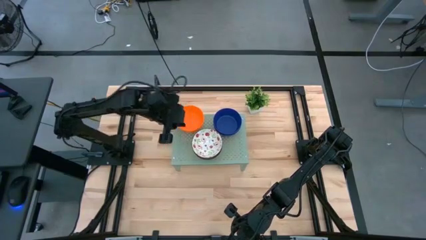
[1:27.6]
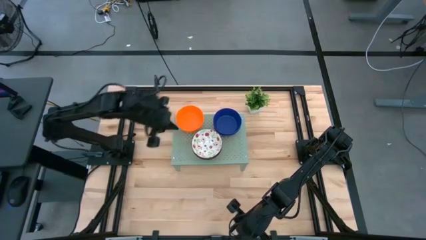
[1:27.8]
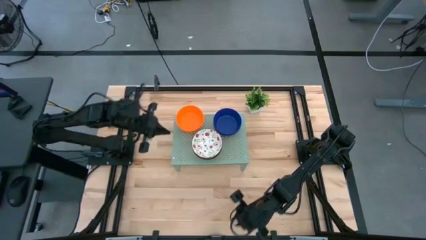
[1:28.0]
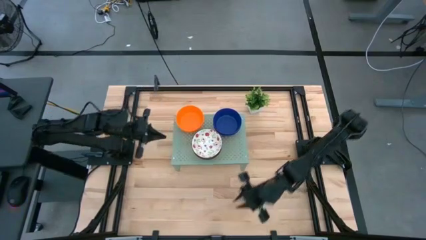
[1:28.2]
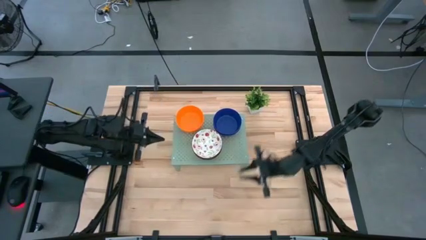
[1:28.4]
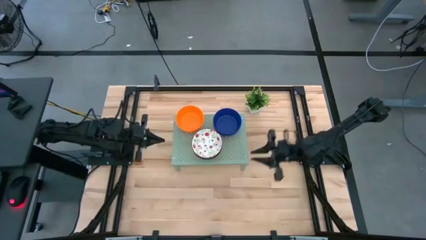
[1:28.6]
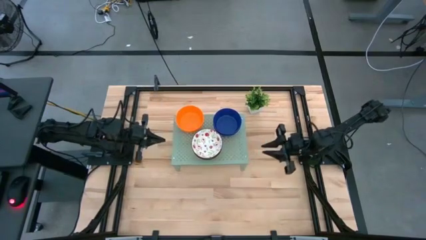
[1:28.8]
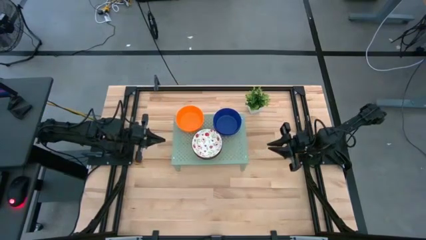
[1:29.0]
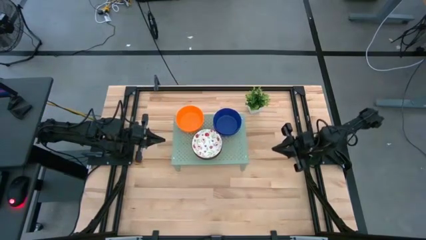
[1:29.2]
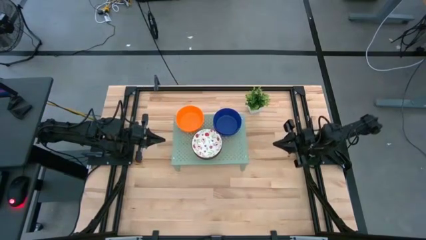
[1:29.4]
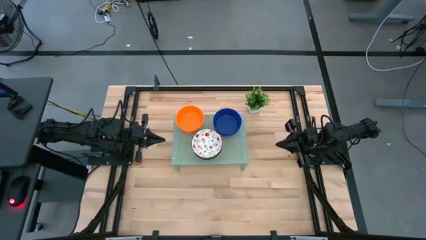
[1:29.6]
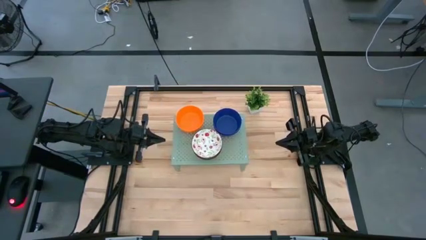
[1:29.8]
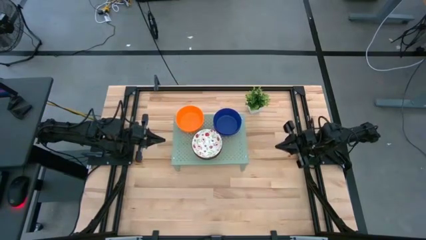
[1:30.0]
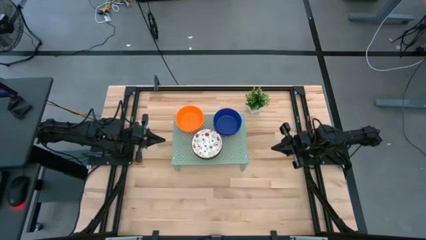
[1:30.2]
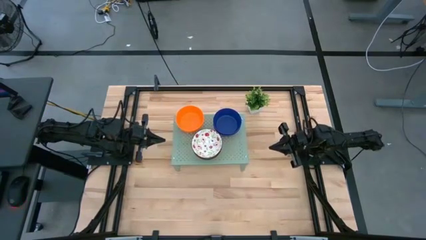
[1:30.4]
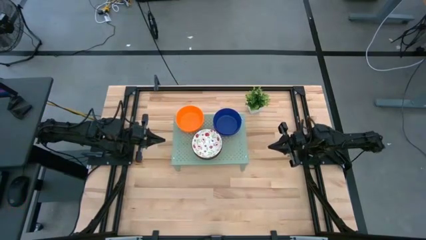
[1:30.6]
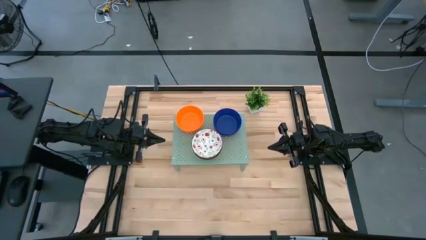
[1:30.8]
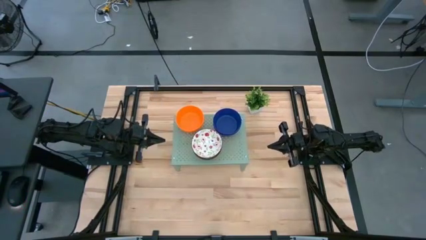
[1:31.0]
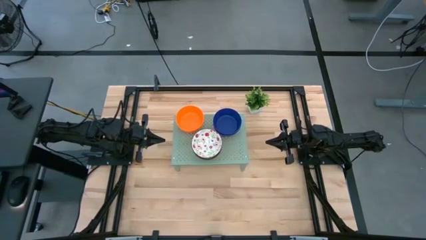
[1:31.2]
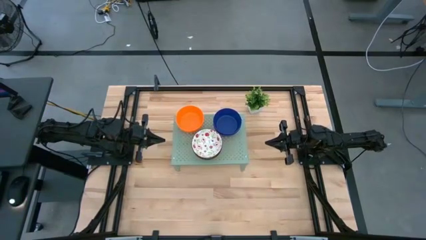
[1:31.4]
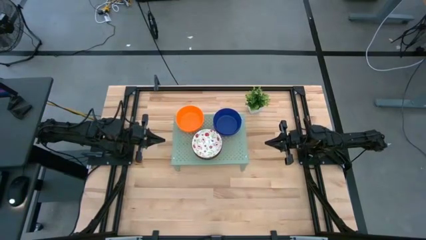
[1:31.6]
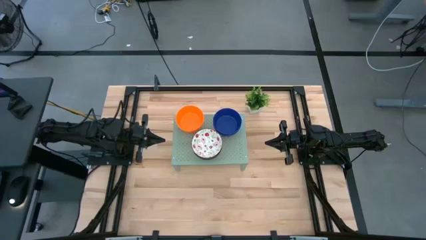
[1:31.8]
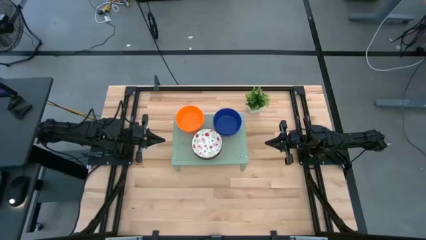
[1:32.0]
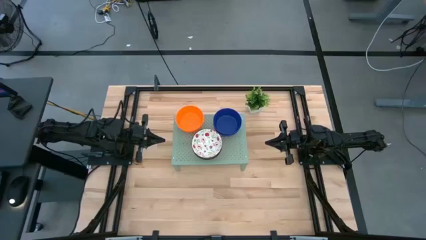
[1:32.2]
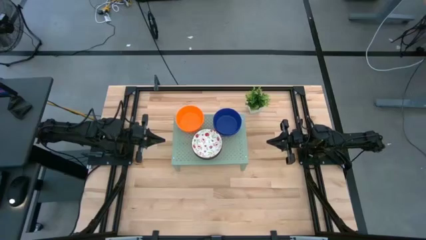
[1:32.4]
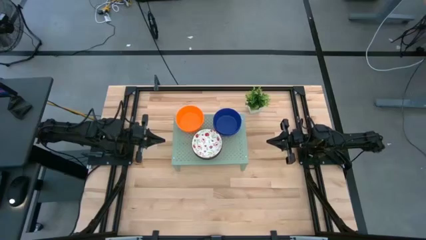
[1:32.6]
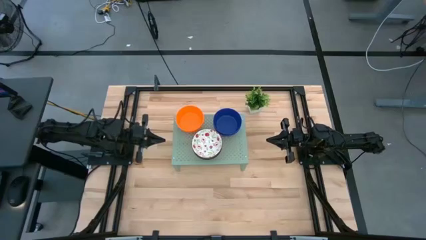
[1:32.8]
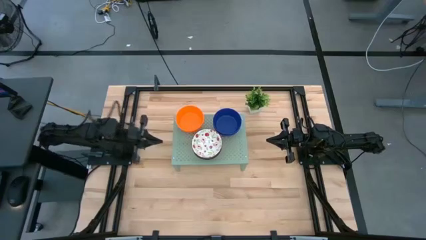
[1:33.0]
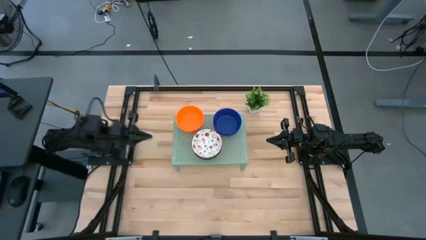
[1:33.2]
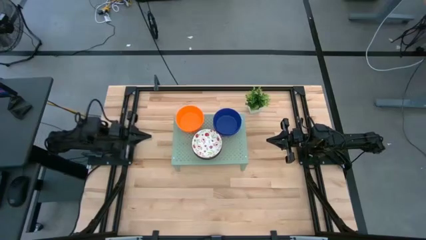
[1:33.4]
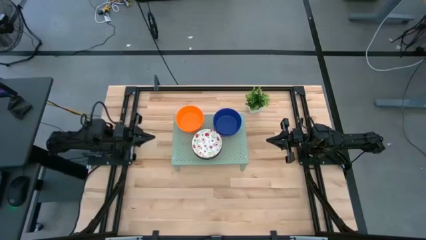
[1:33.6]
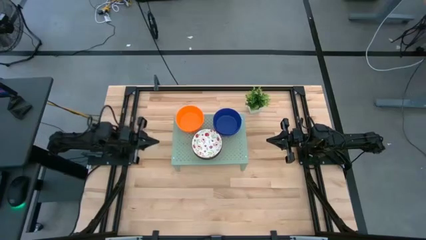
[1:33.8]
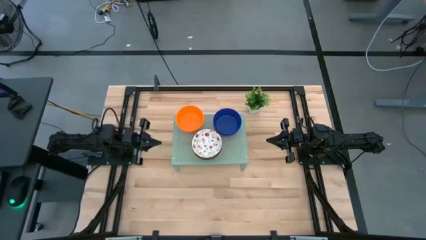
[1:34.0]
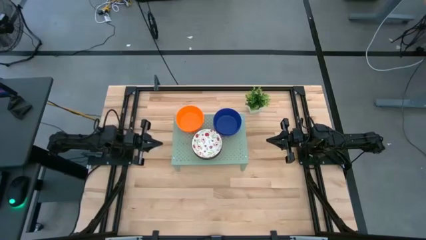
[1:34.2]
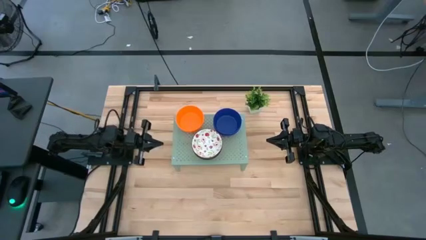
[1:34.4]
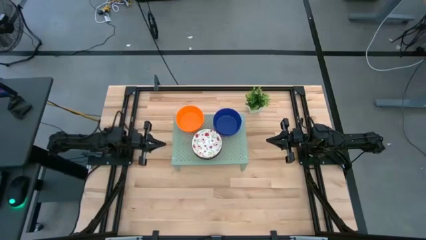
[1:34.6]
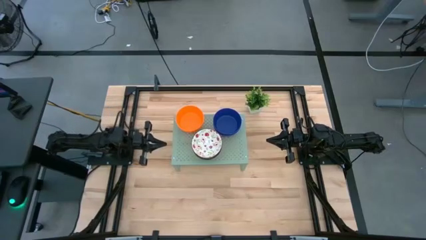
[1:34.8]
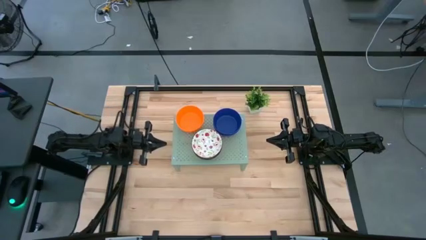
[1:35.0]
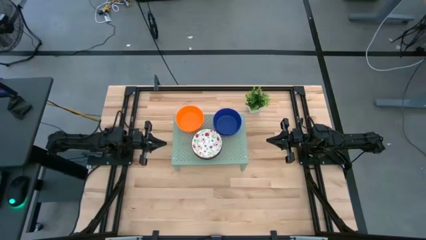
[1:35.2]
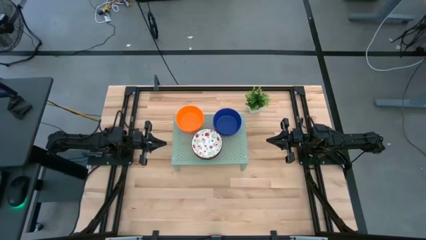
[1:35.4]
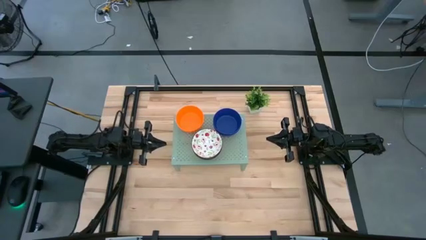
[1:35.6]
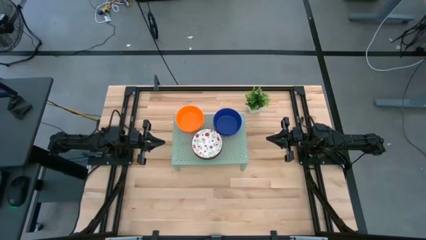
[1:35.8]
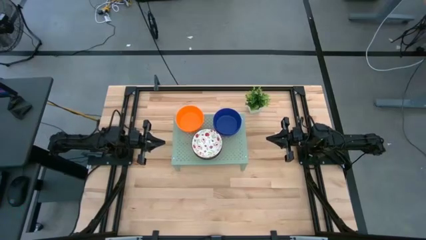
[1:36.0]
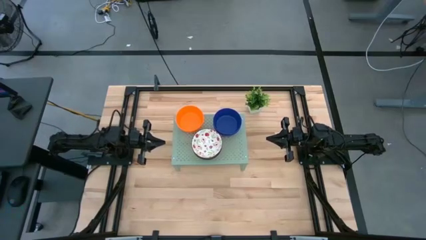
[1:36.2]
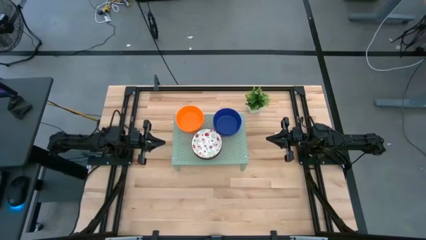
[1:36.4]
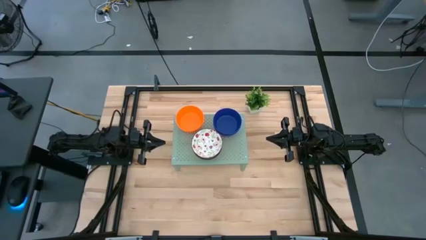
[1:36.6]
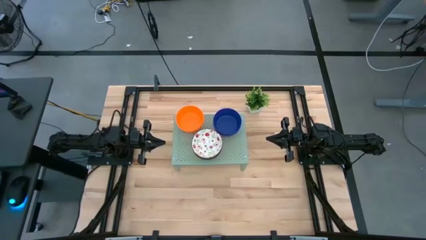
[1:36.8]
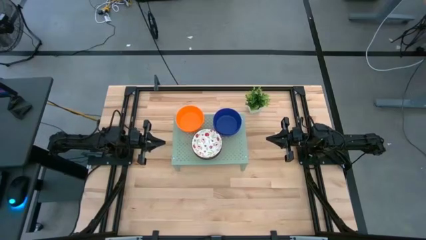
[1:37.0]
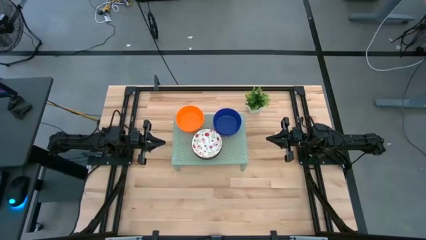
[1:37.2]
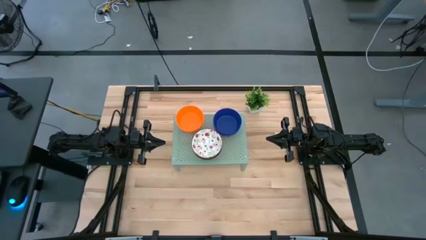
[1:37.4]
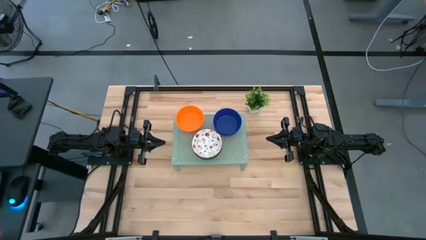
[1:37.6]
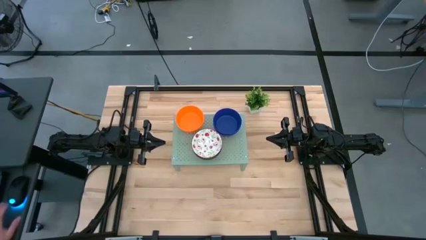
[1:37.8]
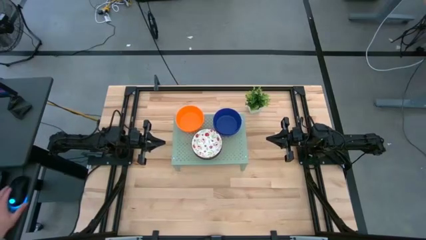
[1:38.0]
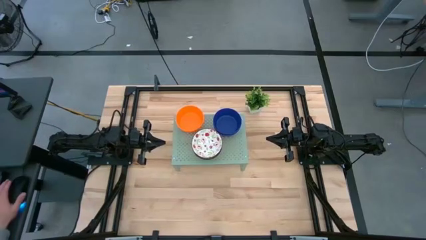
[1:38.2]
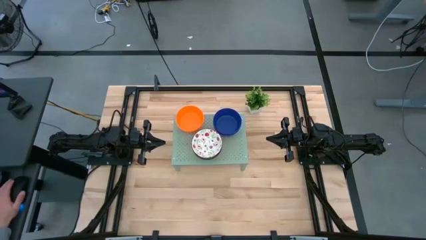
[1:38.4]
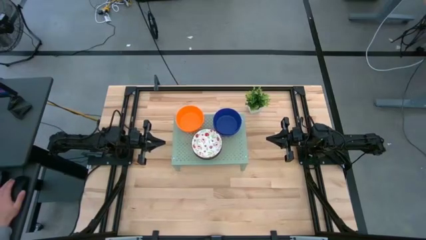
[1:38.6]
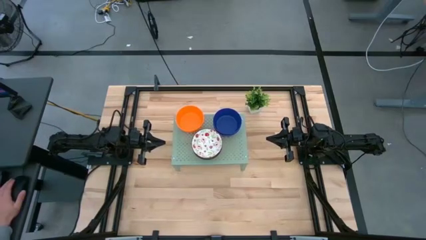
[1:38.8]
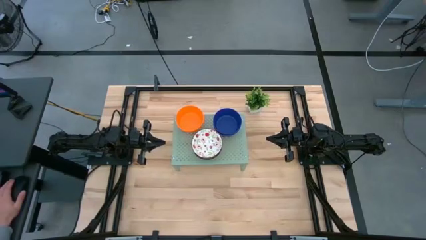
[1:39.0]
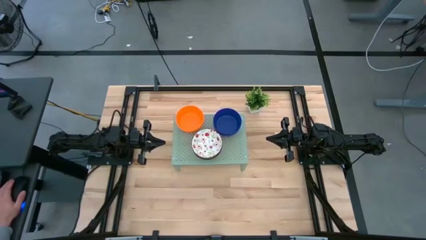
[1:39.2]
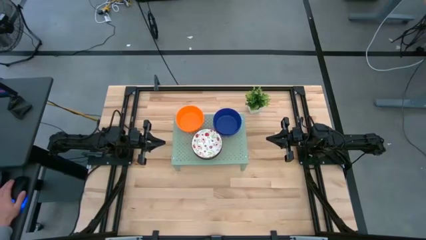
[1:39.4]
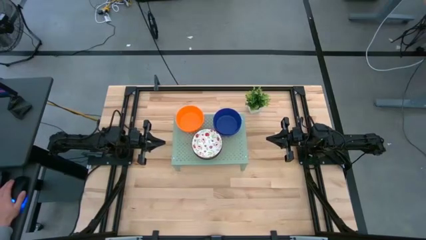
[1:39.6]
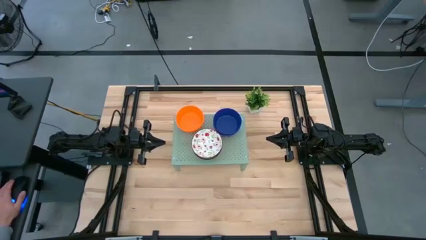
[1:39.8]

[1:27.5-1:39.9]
Task: Pick & Place Mini bowls
Return to Home Position

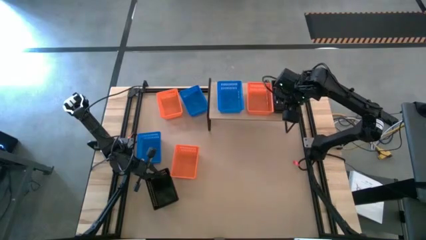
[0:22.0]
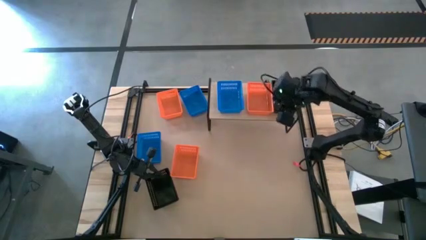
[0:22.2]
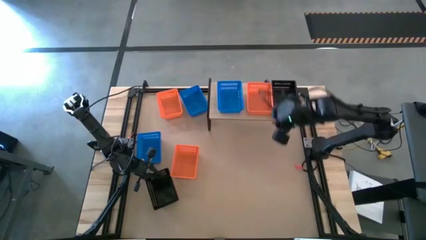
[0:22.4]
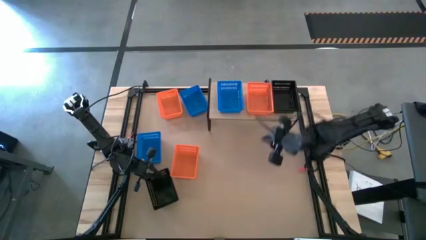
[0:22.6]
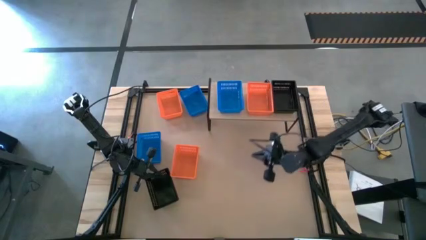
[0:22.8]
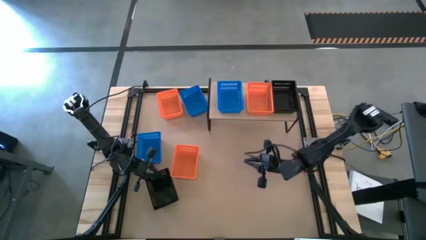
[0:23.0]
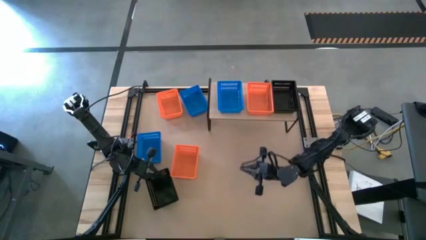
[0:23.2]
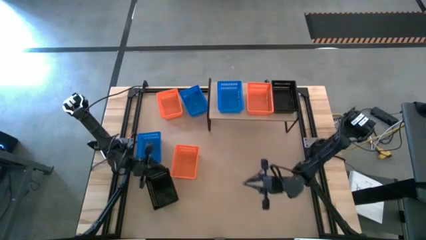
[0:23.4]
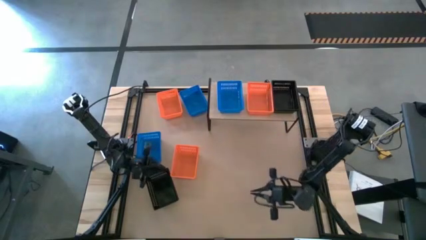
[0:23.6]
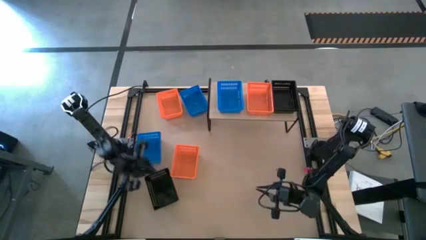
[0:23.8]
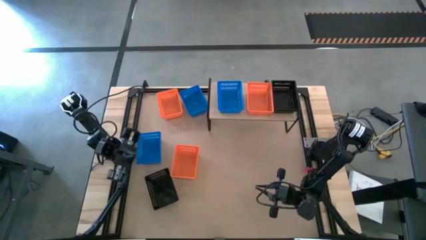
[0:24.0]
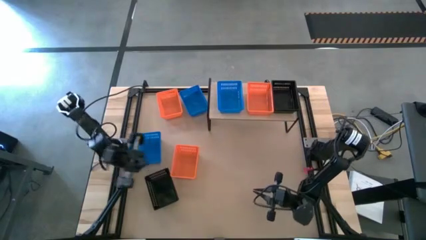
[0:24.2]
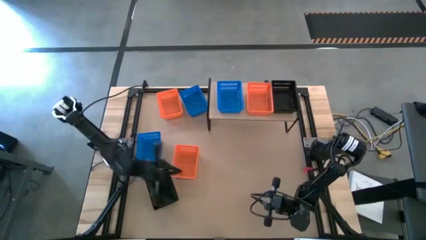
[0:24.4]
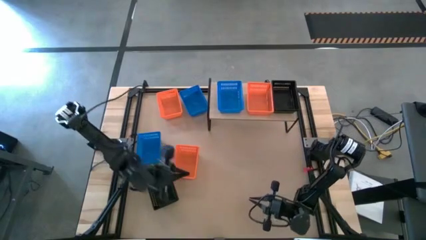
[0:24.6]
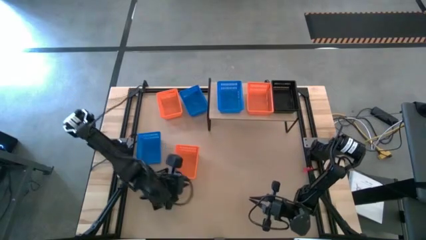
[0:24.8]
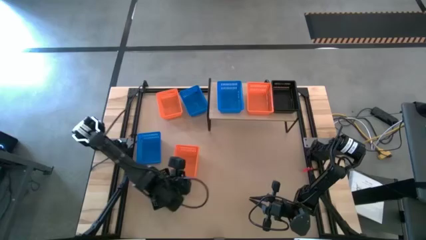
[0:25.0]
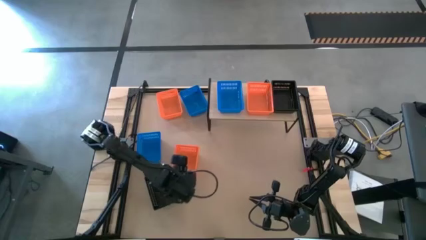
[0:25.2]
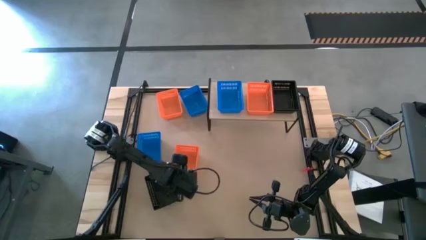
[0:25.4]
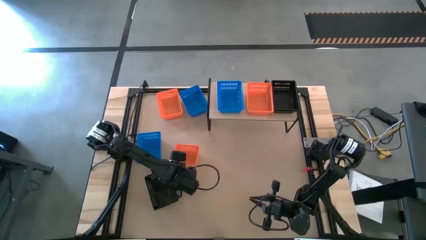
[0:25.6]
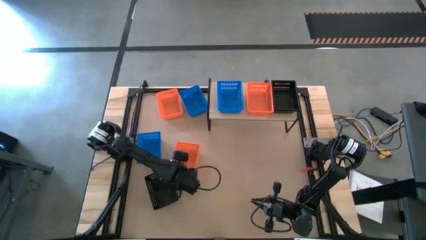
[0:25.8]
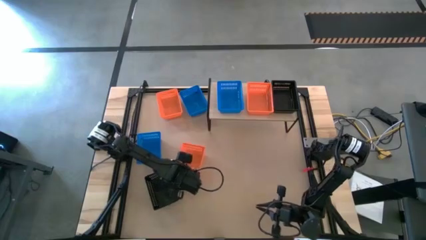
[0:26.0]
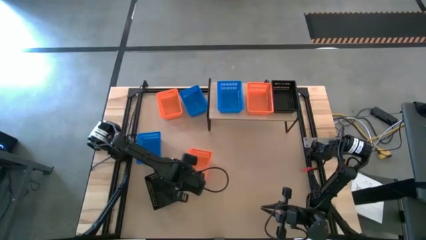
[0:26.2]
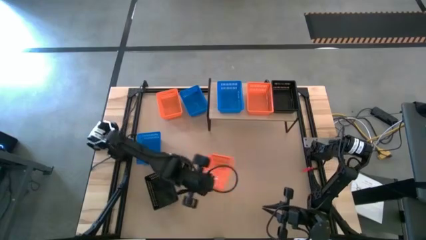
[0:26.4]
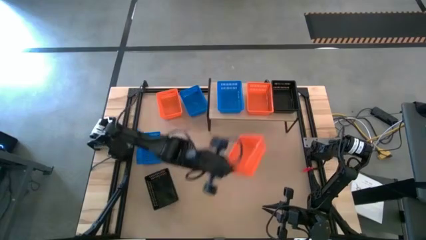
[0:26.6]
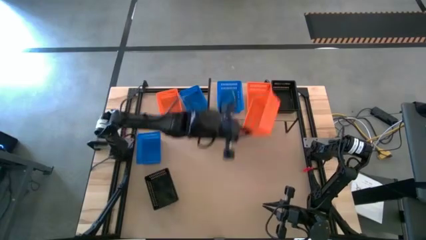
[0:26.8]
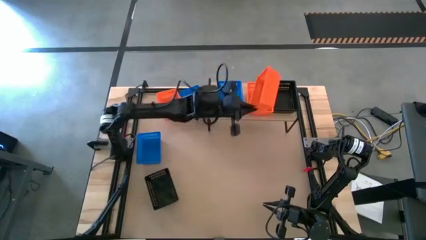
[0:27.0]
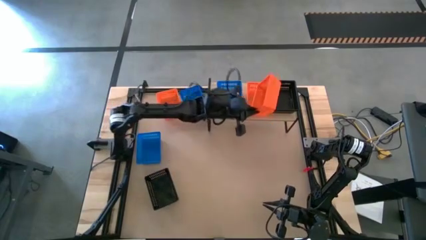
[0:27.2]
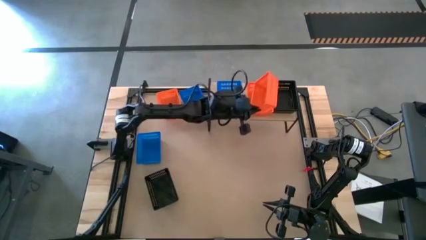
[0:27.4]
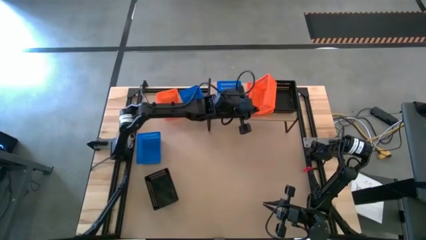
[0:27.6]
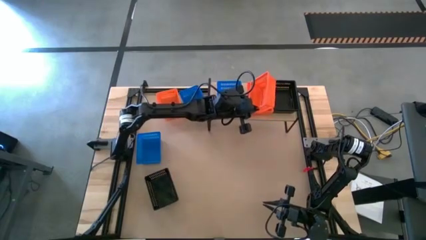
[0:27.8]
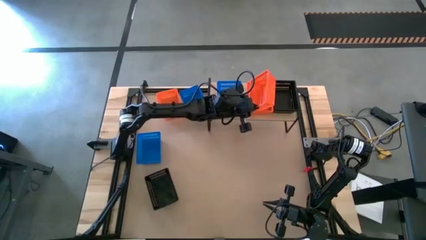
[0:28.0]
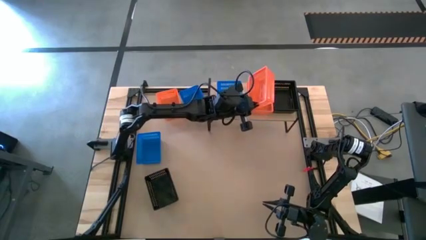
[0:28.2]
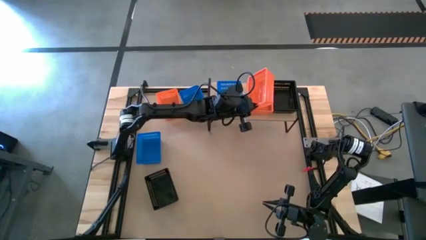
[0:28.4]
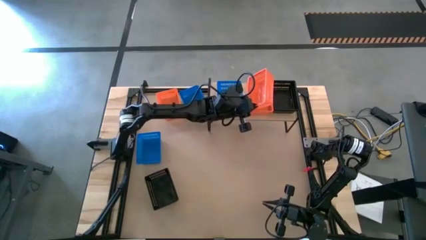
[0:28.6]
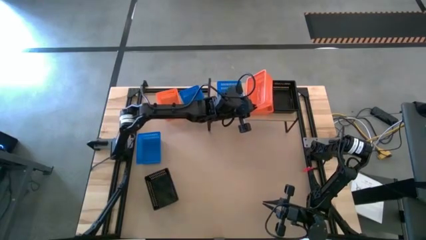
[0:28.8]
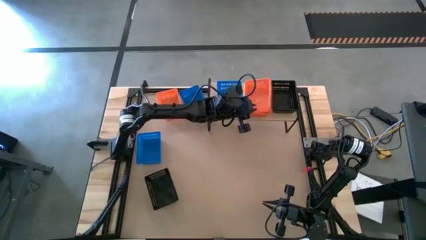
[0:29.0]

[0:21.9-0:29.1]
Task: Stack baskets on shelf by color
Stack the bottom orange bin on top of the orange bin on the shelf
